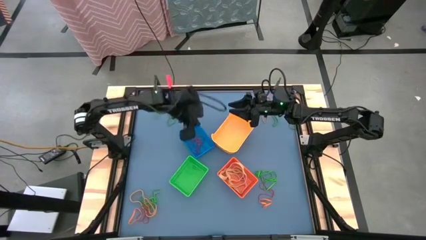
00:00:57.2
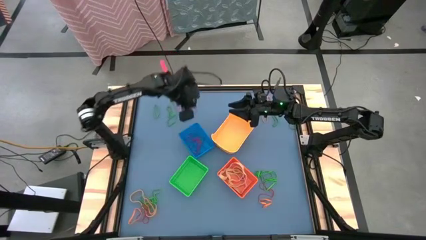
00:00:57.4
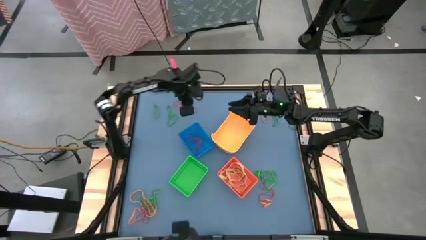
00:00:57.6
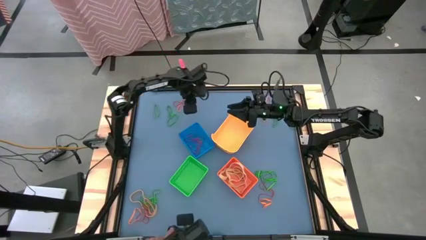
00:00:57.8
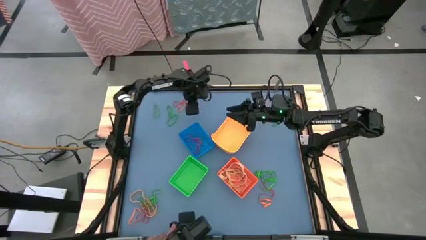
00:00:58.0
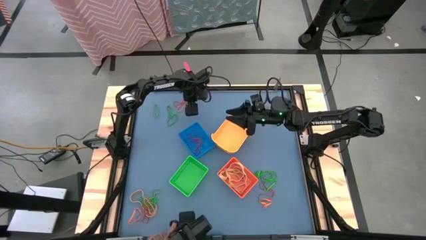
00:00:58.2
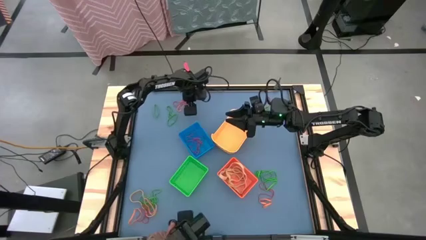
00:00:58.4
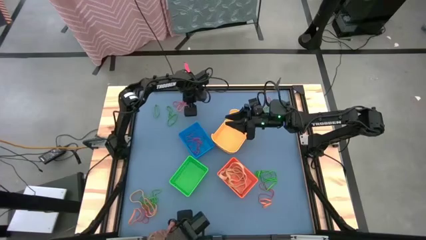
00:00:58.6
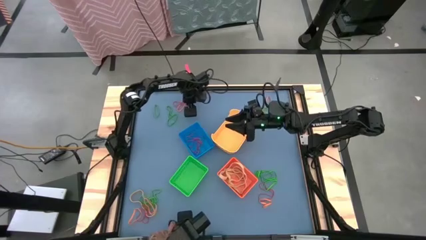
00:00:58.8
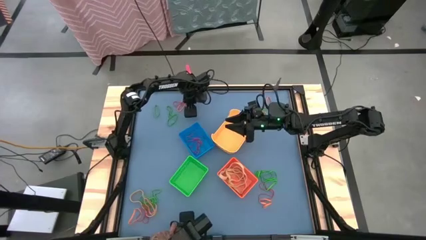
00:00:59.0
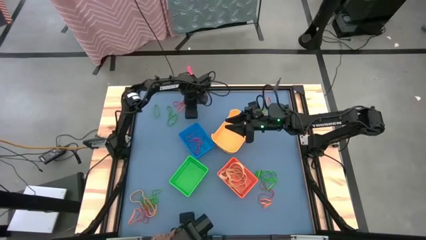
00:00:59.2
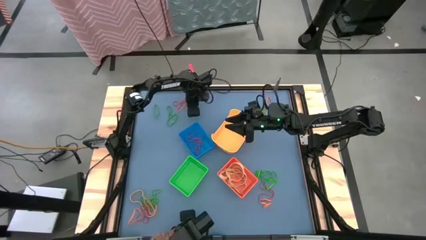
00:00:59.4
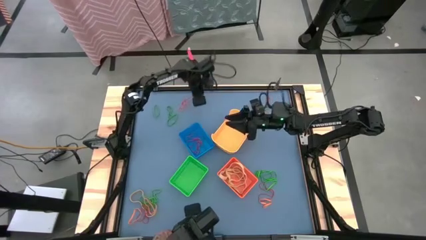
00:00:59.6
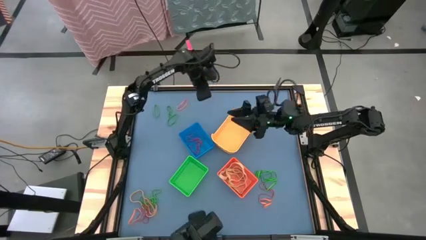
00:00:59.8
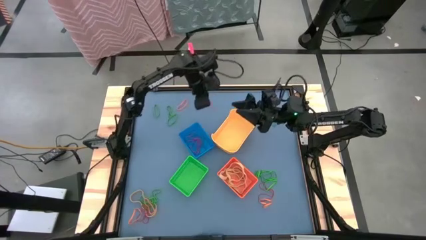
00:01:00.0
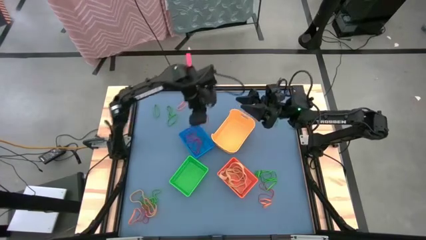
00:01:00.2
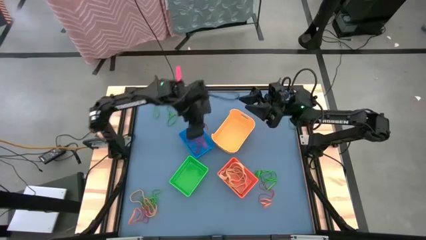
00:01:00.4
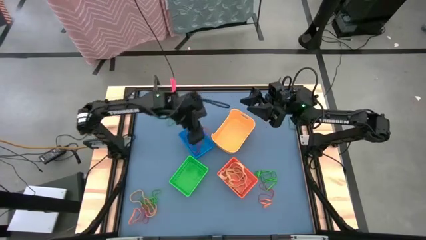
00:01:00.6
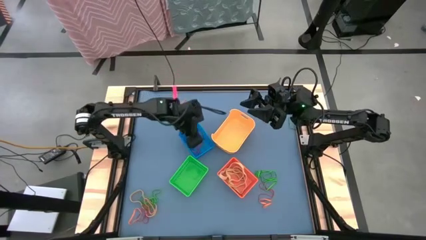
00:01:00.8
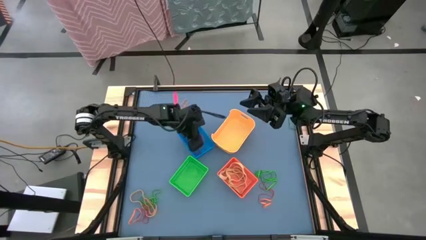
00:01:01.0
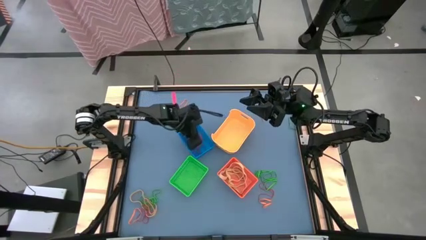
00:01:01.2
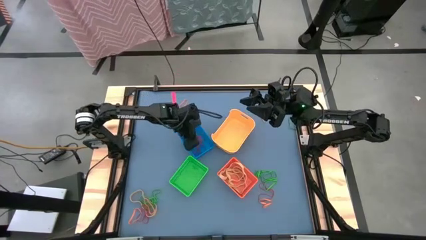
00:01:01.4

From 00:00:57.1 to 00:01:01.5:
Task: Sort rubber bands into baskets
Put the red rubber band into the blue bin

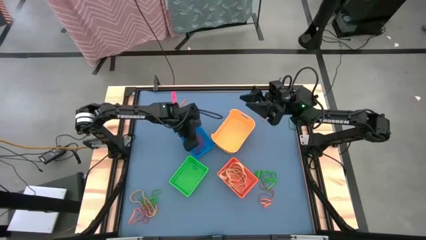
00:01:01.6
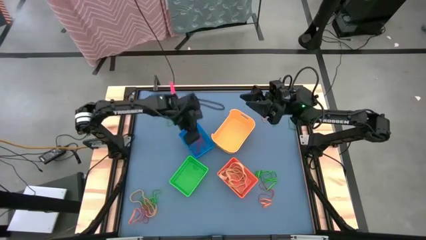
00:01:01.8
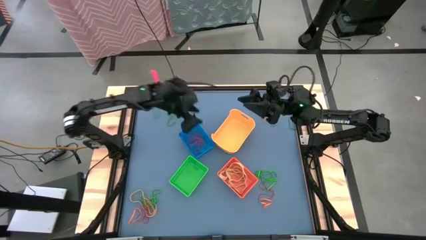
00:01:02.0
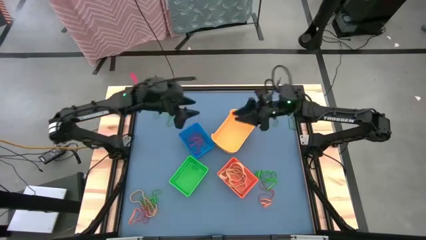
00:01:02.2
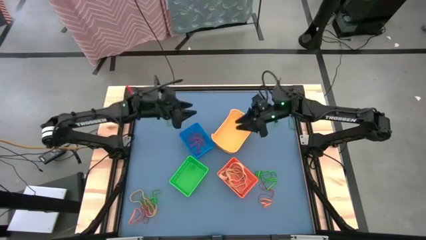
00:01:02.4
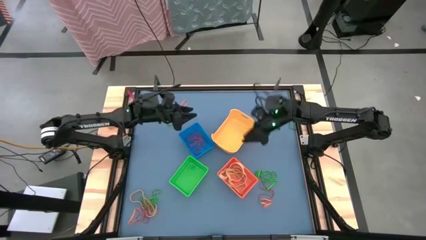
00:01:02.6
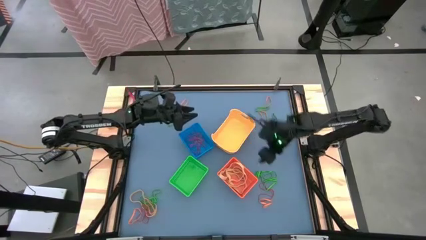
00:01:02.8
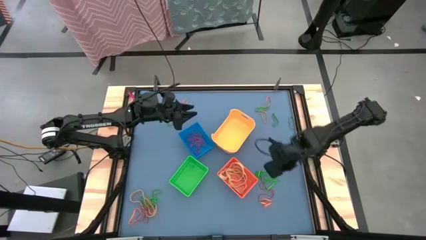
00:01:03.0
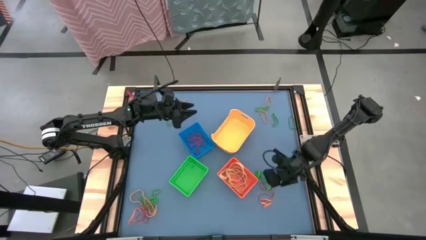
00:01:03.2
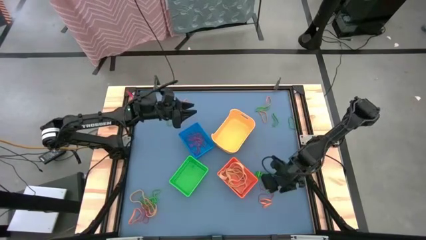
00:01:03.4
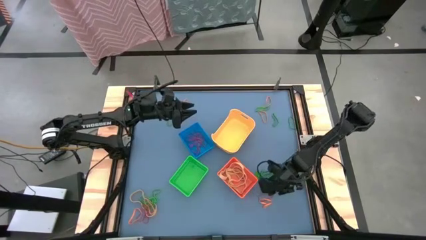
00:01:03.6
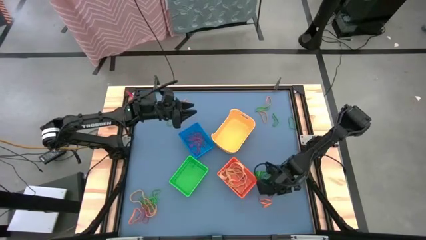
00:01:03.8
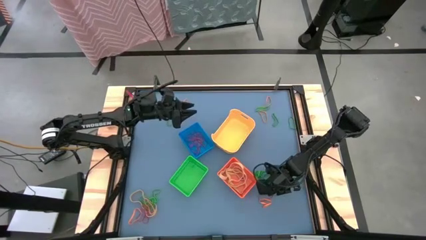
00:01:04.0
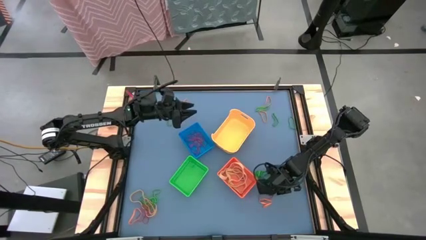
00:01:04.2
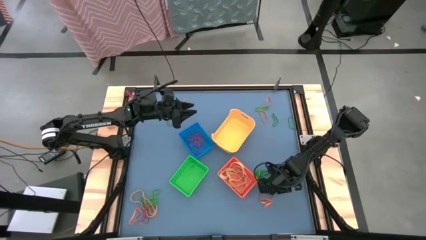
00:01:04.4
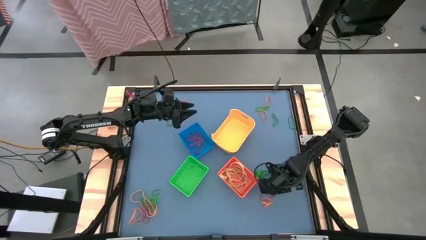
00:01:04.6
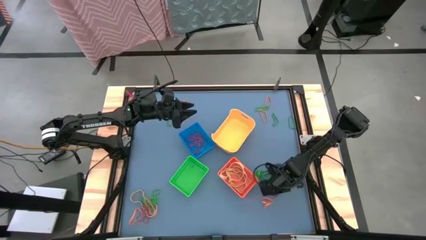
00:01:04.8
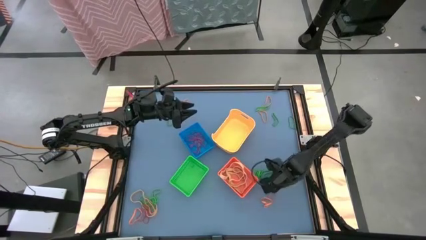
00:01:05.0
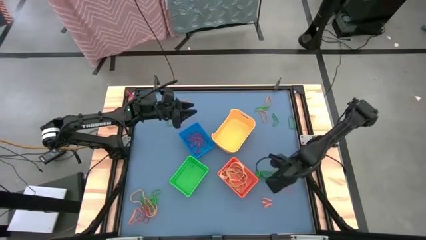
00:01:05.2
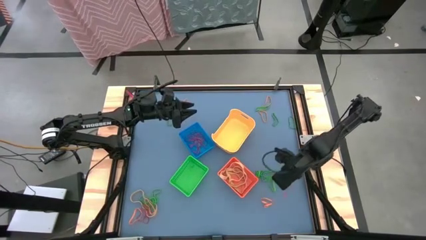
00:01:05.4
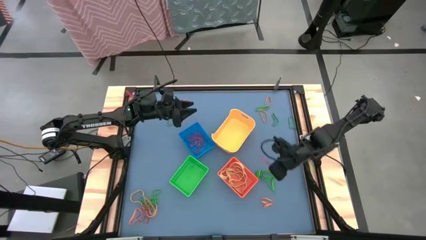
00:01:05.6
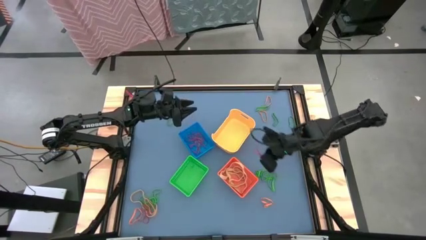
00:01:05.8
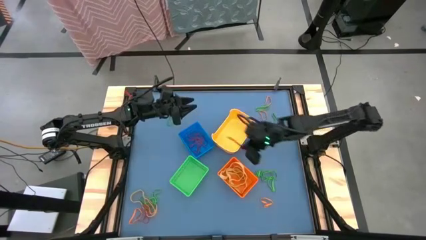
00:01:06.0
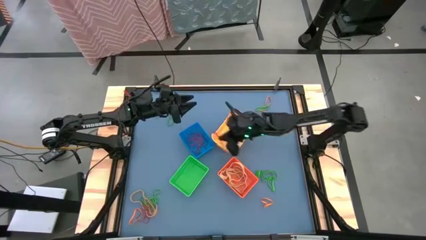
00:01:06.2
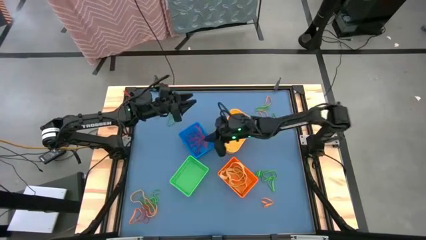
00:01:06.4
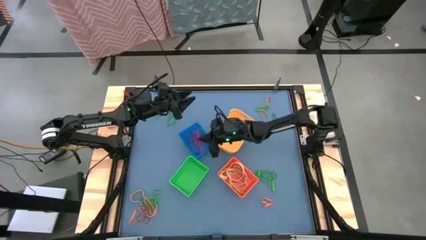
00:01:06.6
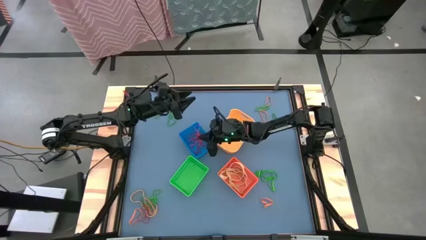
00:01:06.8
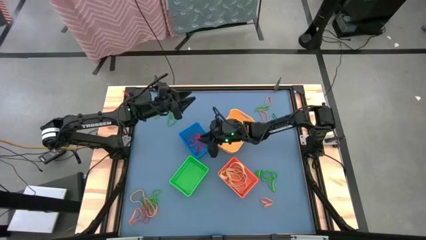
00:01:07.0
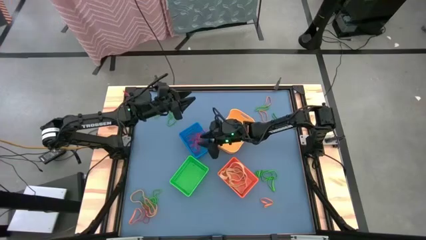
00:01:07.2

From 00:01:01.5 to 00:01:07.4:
Put the red rubber band into the blue bin

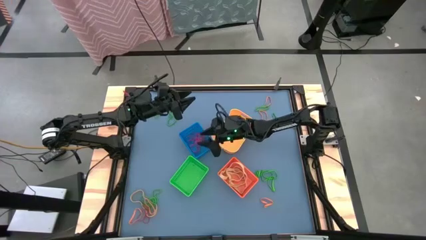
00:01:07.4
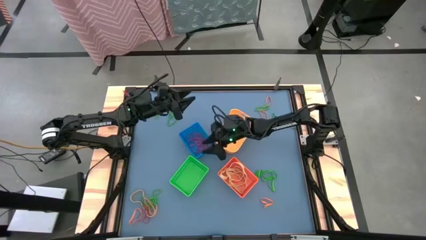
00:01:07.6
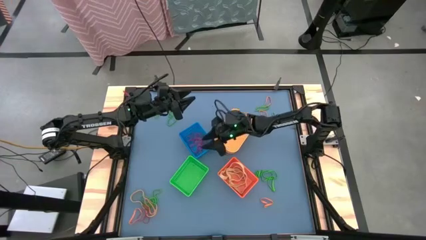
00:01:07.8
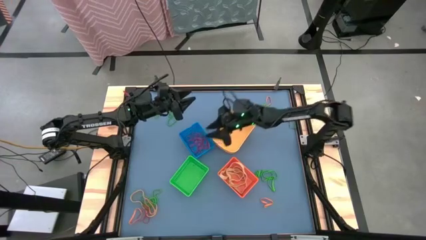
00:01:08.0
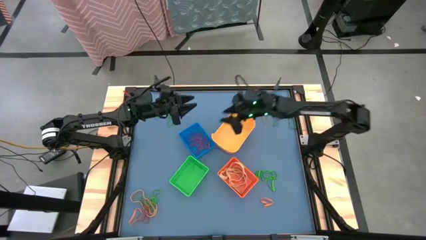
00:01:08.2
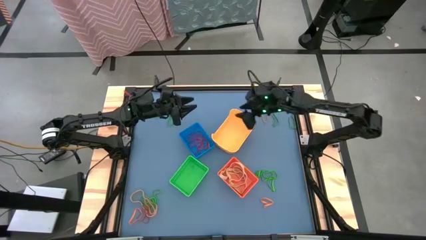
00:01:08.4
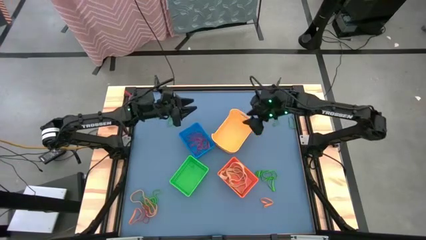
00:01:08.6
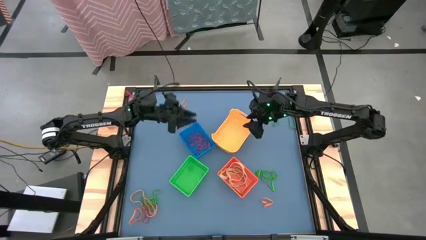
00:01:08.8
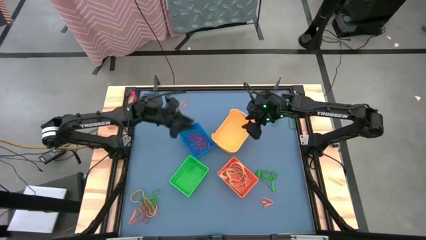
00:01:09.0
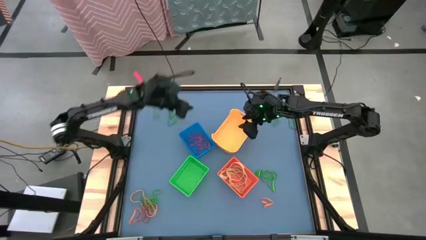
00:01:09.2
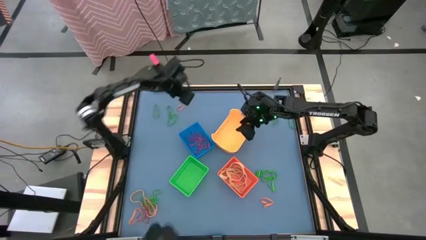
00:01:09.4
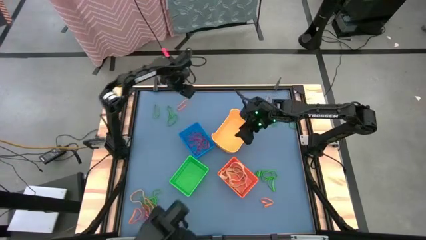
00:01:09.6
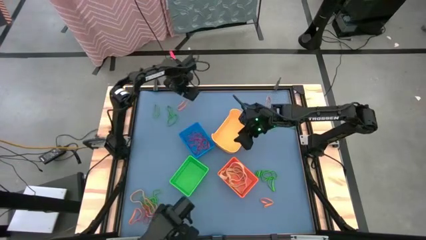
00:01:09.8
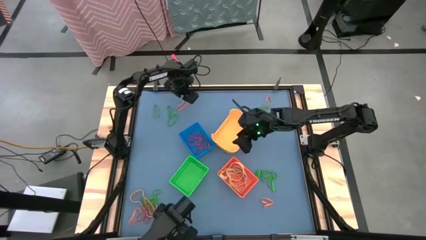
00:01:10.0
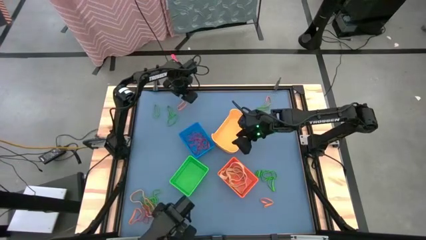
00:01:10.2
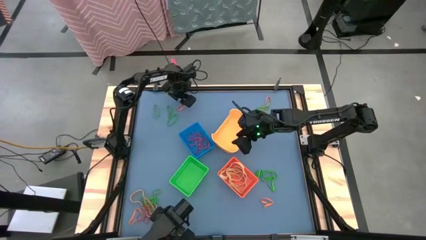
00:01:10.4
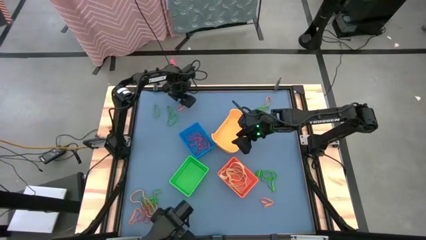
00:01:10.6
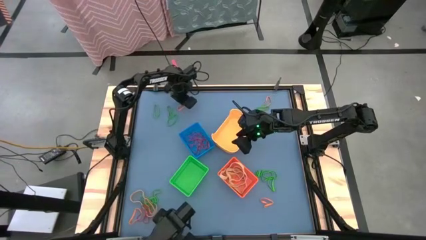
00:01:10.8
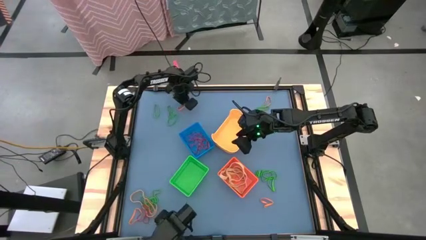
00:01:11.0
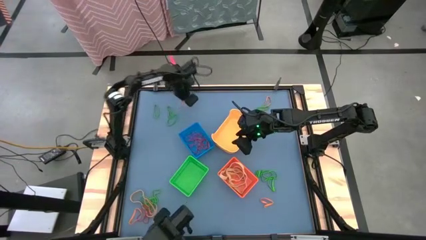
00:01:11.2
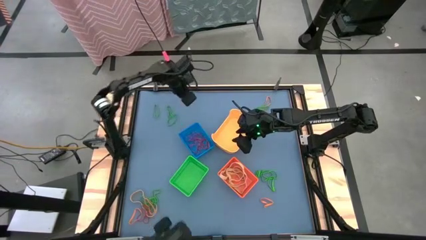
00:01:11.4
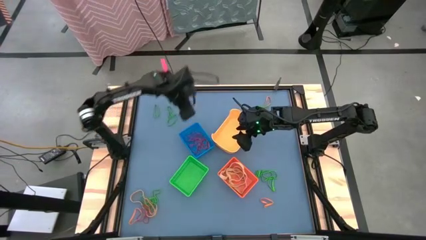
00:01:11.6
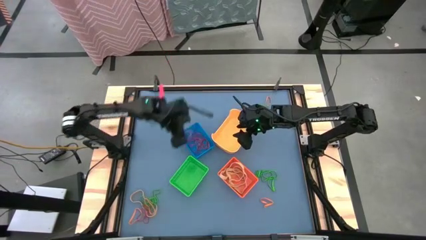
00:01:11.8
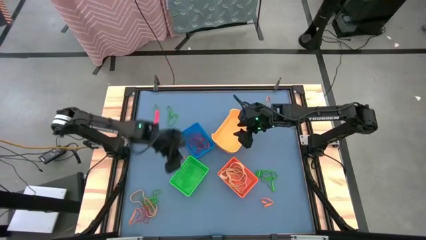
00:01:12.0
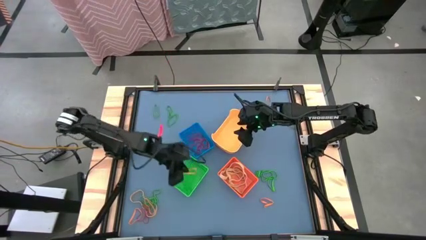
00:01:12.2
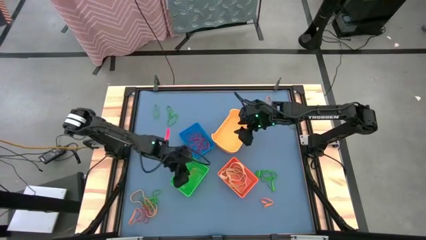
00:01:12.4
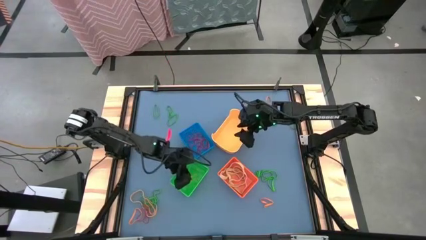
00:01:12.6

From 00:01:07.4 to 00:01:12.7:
Put the orange rubber band into the green bin
